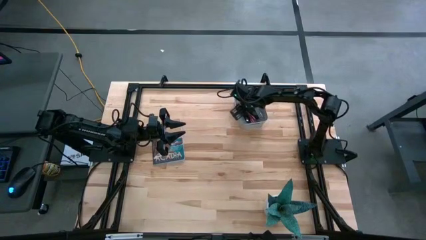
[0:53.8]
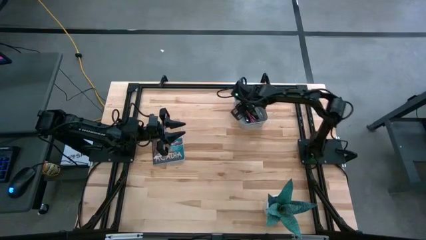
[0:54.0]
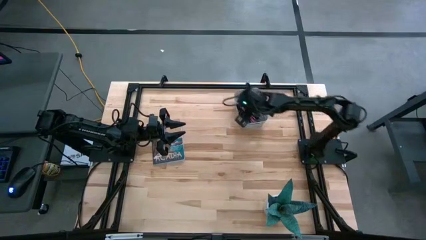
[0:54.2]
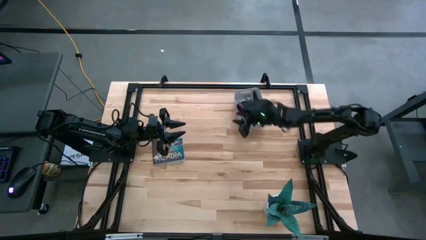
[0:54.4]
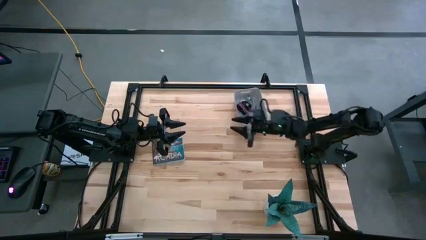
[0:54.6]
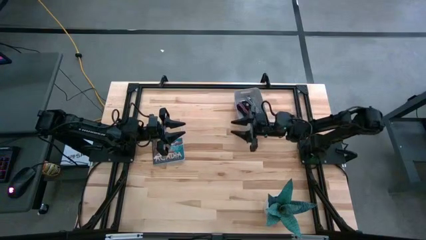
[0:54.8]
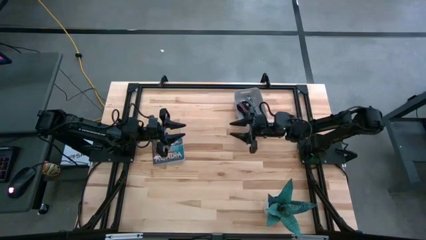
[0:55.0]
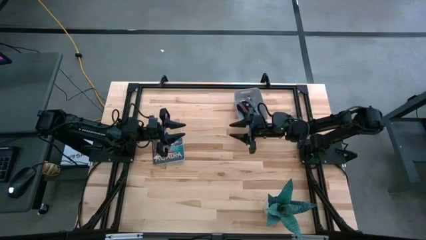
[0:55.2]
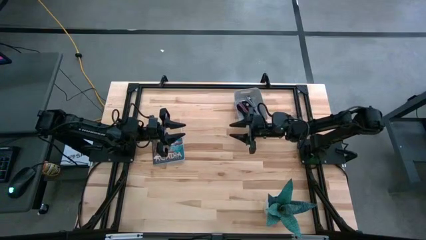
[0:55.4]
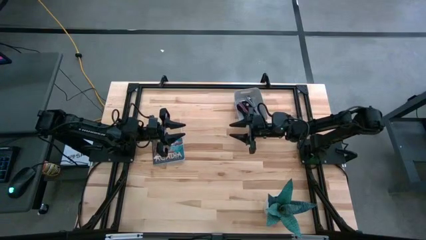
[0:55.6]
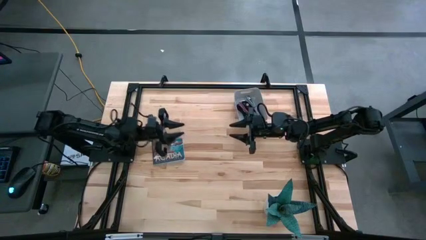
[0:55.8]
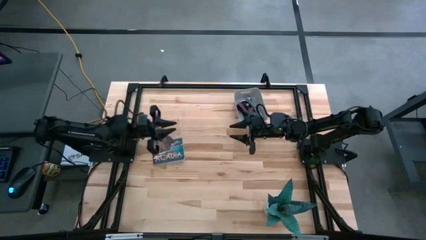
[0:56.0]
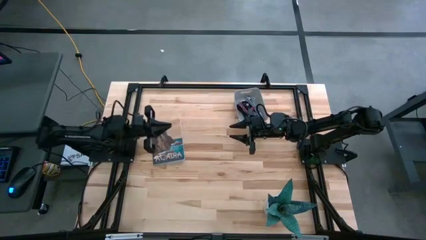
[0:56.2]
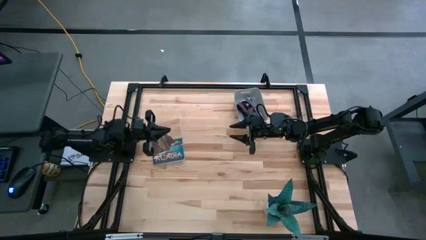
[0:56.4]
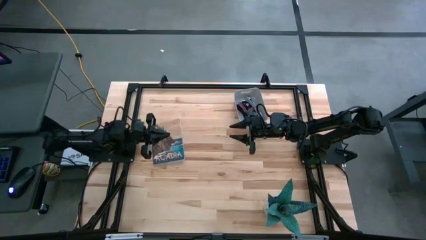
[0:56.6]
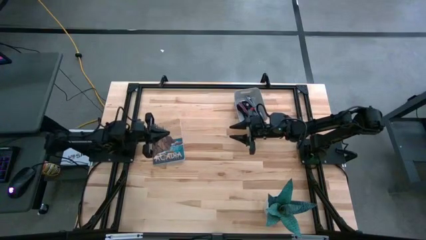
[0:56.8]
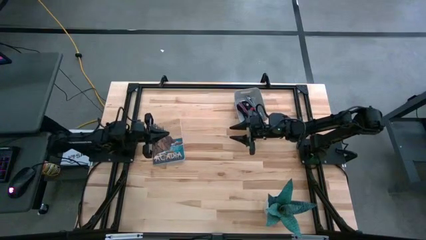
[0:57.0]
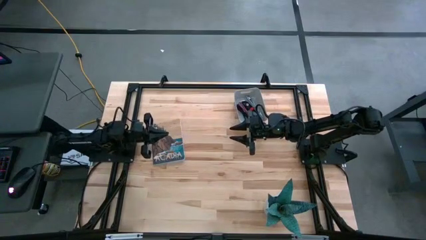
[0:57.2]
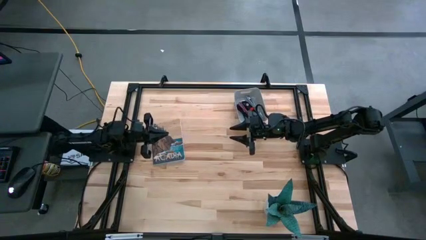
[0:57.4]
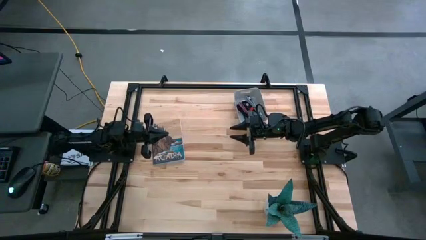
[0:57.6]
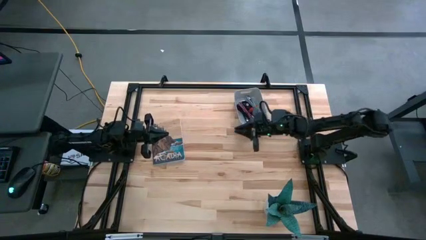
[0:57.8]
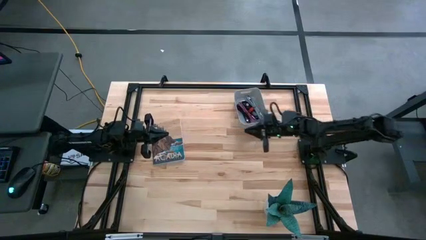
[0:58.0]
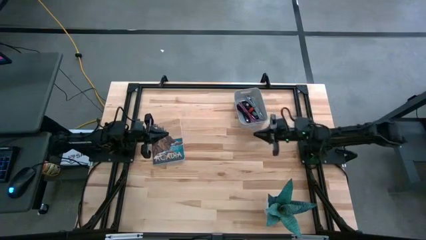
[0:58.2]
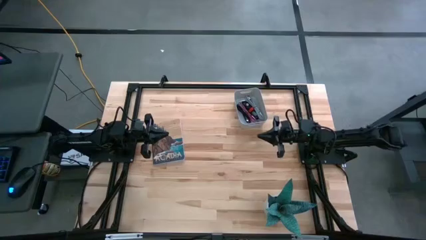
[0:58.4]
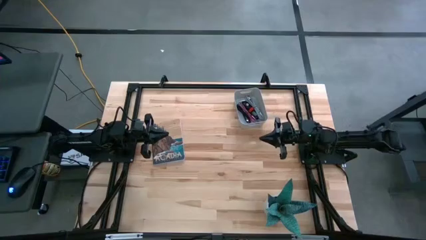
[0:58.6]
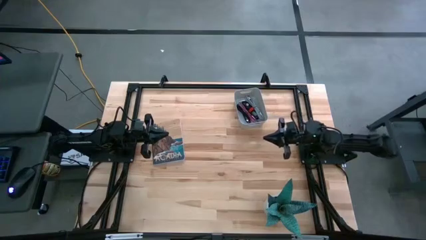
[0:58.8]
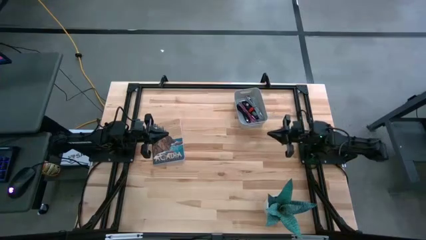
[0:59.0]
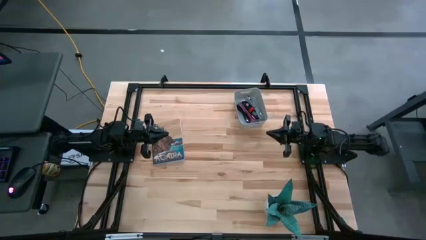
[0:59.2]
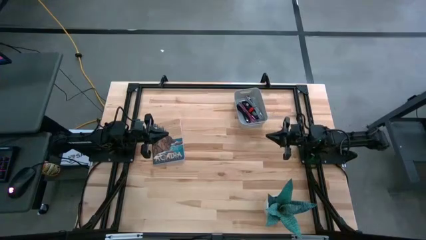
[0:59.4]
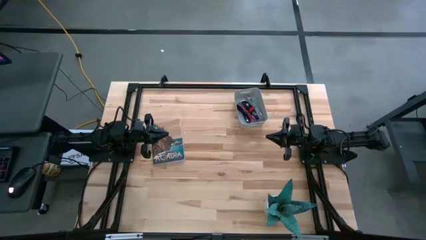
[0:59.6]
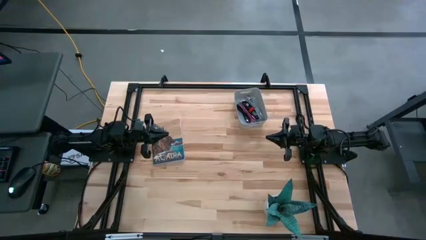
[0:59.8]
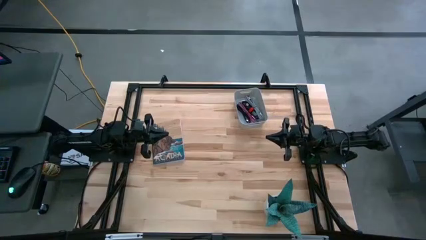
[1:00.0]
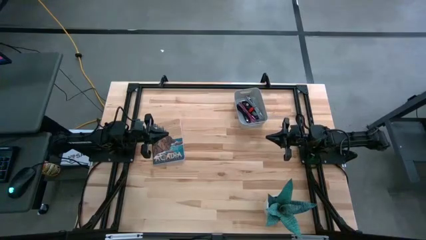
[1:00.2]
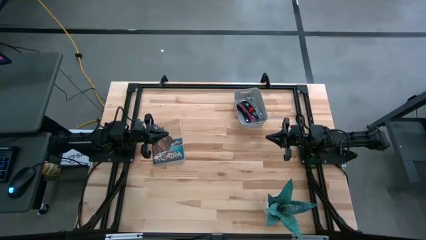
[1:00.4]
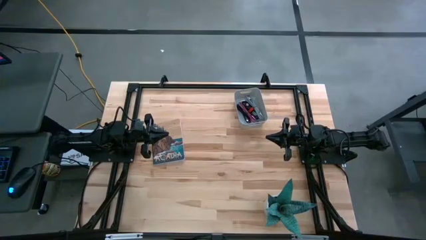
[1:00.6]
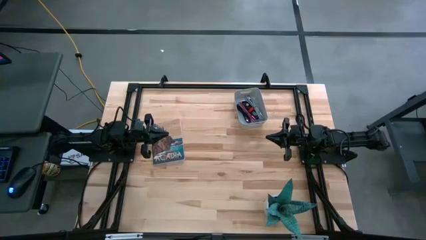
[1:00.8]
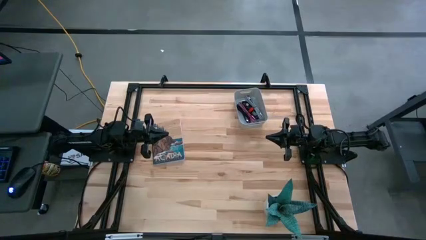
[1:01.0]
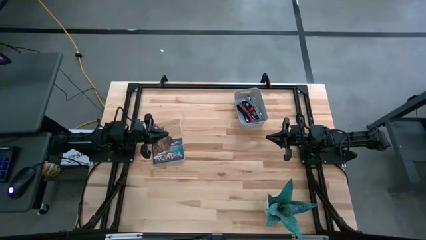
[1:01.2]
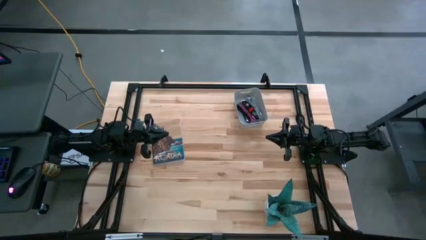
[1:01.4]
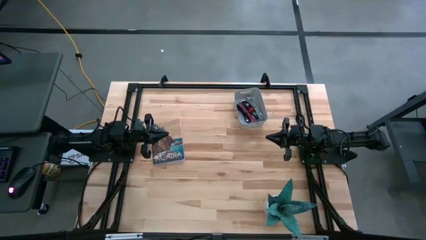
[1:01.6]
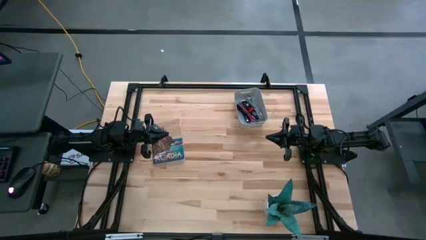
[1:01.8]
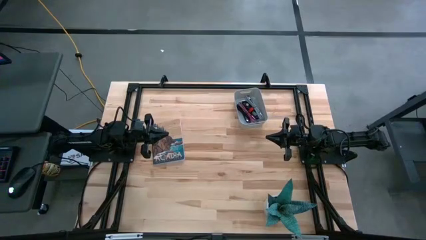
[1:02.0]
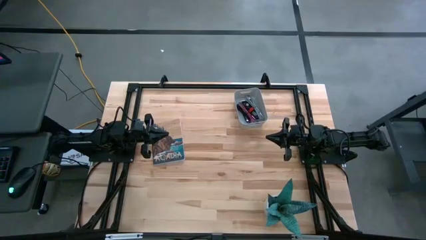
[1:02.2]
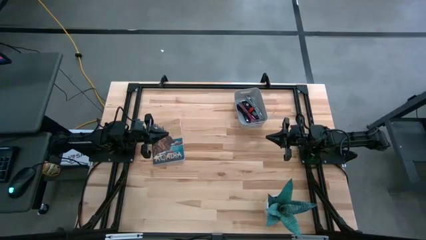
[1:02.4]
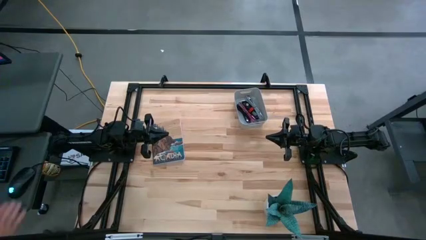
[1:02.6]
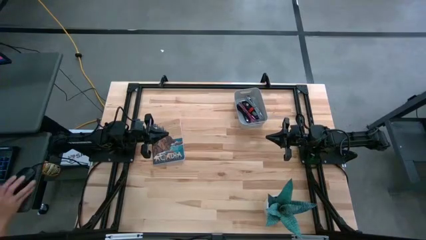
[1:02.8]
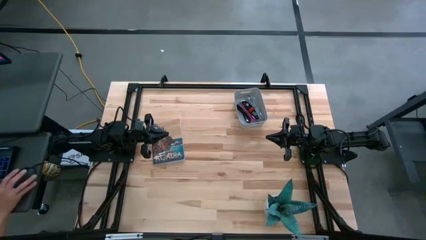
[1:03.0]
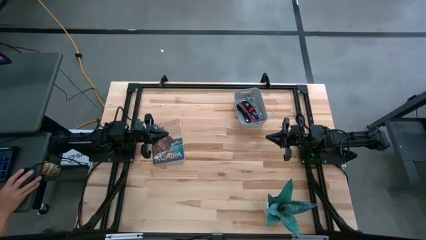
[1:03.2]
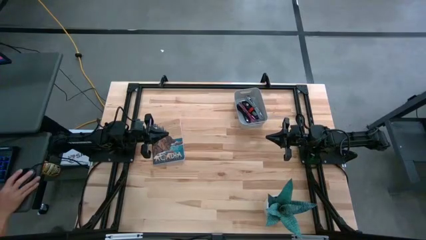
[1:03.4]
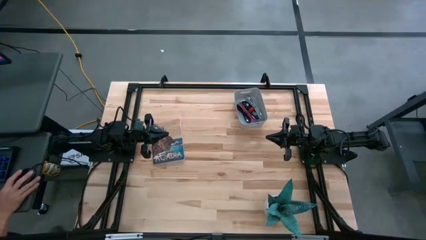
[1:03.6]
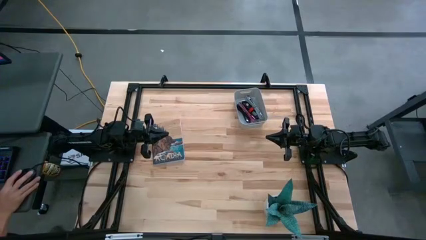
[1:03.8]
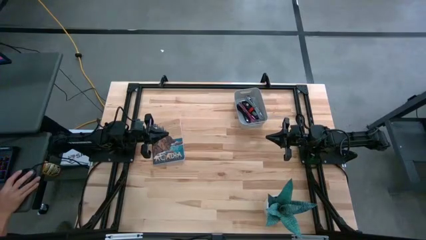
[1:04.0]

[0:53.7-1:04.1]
Task: Pick and place USB-C Cables
Return to Home Position

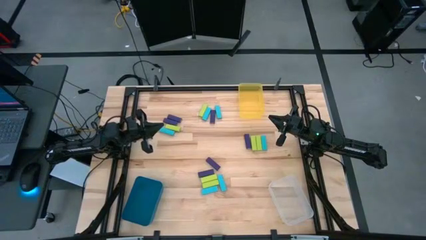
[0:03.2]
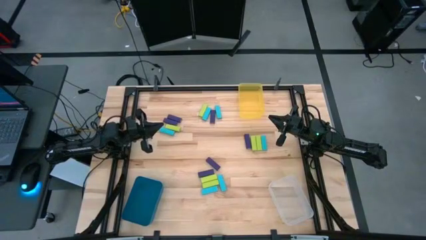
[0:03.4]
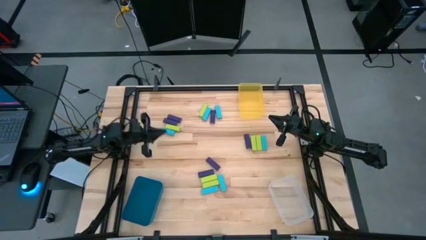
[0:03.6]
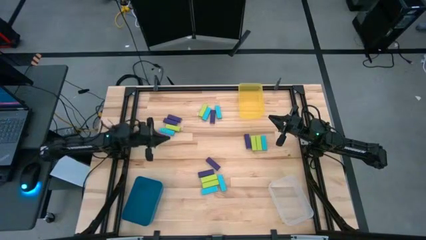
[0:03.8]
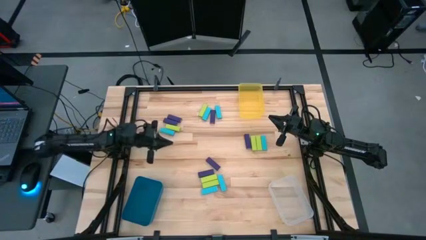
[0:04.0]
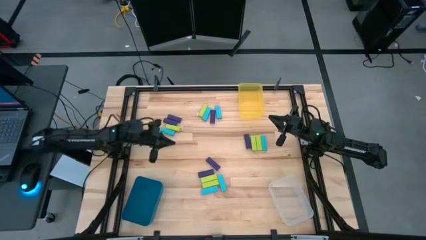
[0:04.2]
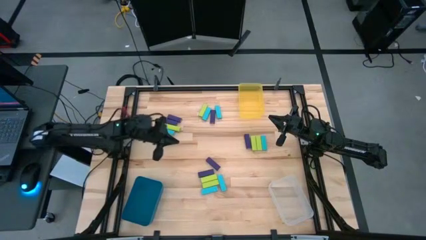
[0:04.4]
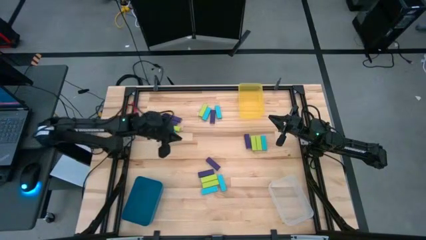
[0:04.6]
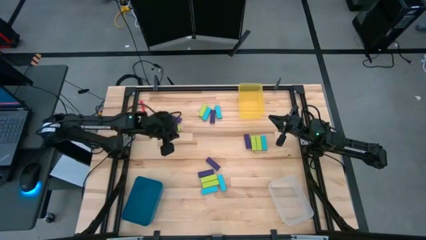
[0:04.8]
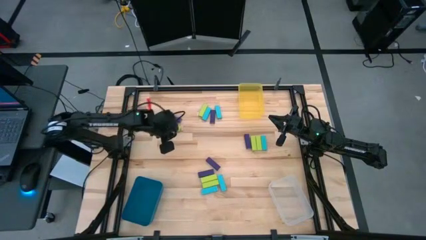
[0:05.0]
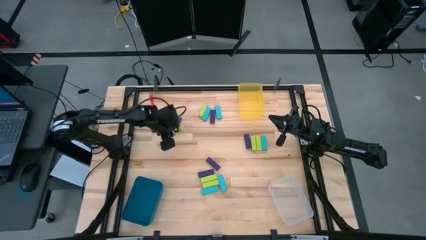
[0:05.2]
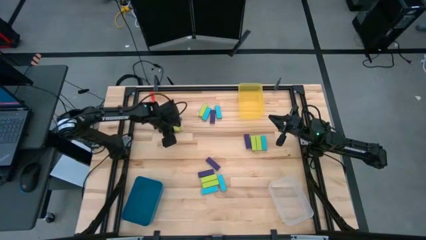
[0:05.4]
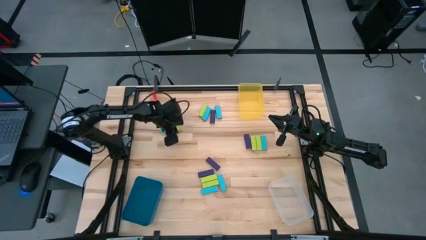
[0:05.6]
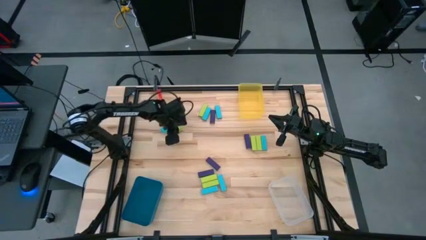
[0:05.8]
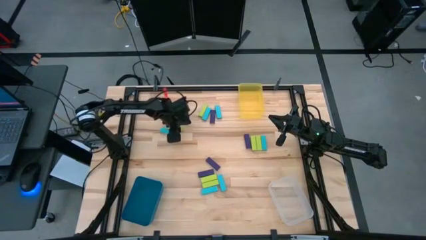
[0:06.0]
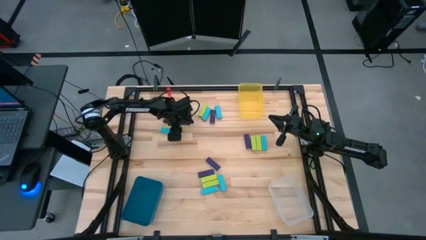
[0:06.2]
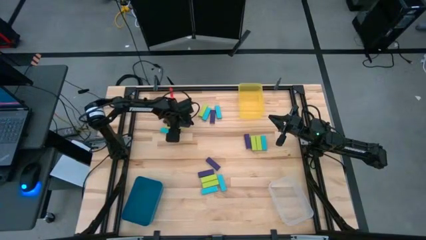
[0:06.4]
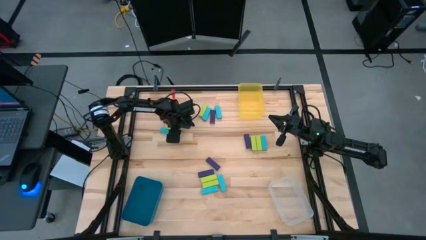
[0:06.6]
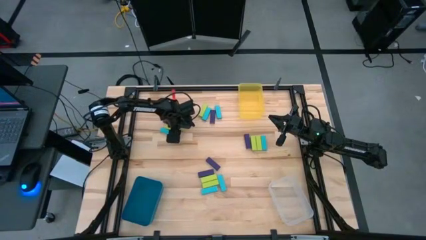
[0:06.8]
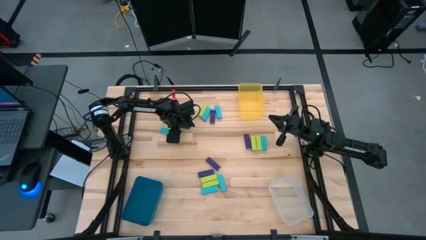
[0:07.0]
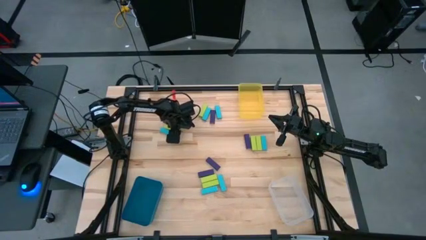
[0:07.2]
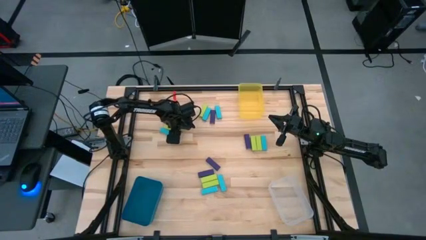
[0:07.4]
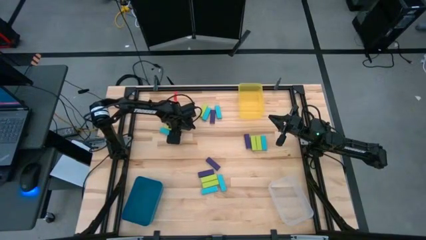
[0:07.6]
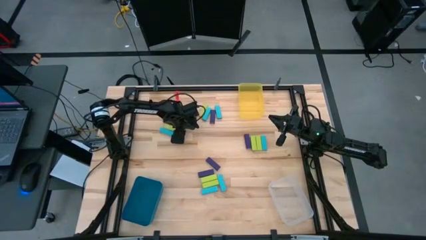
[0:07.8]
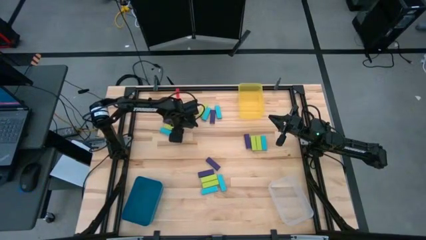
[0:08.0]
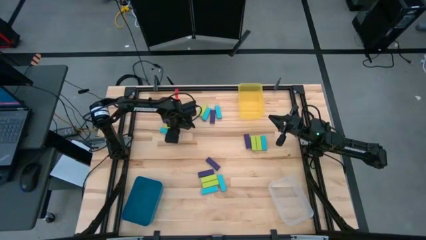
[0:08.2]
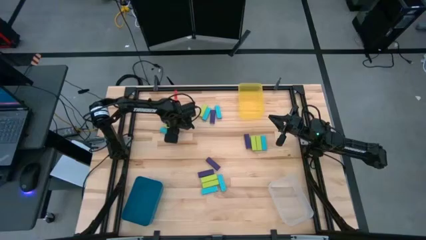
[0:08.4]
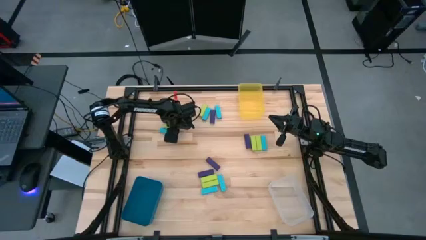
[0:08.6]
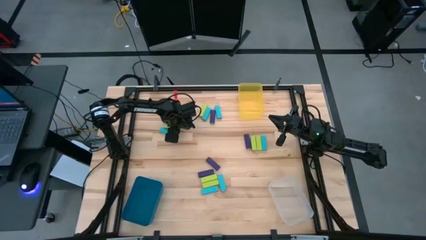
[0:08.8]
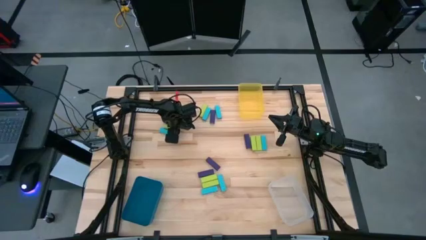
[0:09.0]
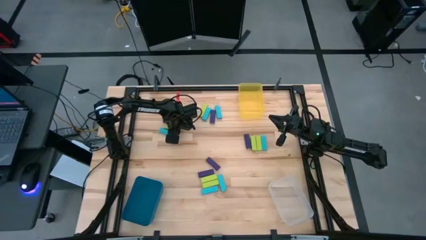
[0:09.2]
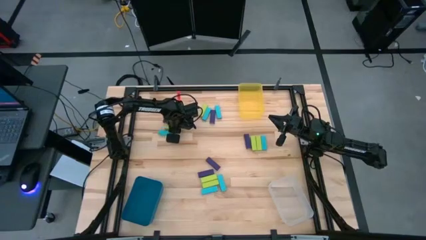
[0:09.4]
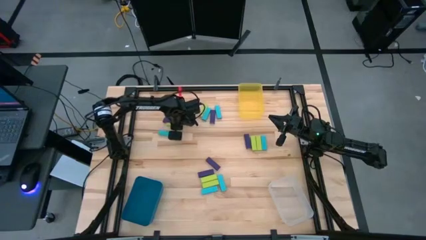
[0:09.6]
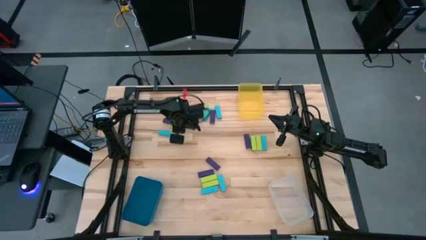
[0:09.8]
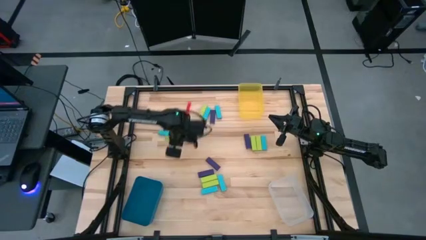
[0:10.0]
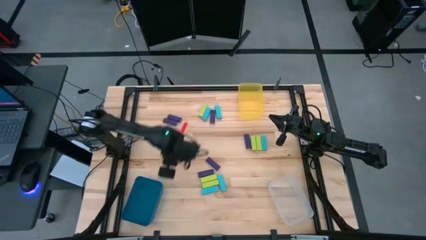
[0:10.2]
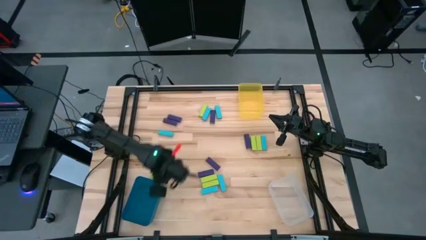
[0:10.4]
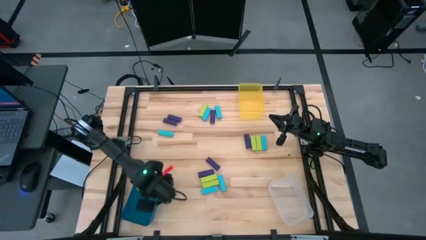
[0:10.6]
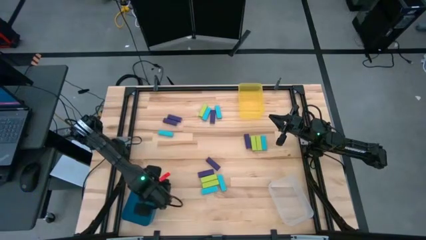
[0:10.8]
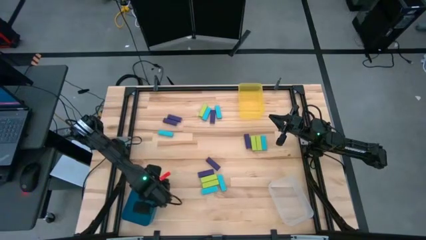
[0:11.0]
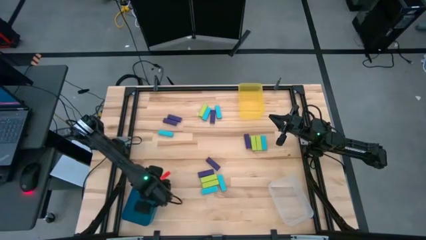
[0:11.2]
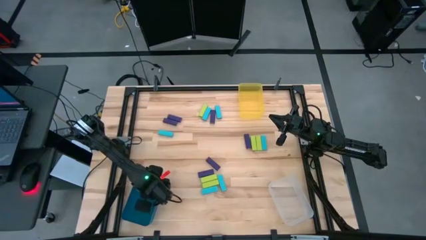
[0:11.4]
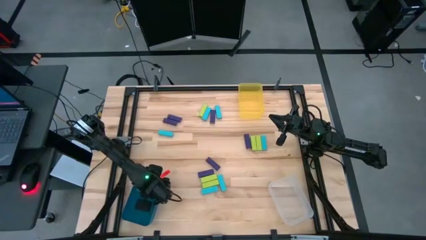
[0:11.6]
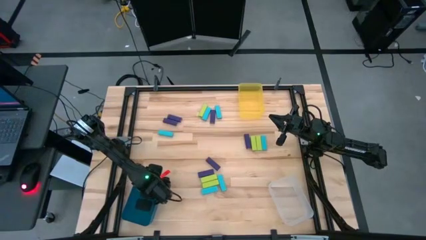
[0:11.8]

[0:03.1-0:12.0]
Task: Sort blocks
Put the green block into the blue bin
